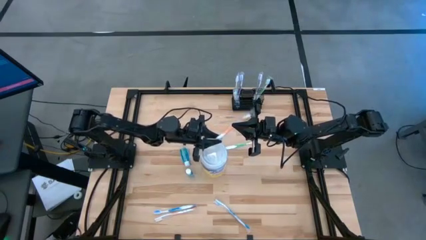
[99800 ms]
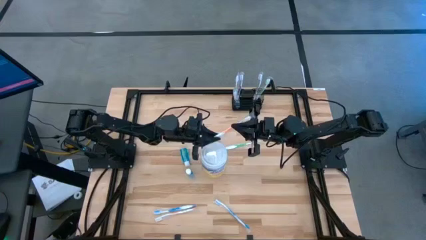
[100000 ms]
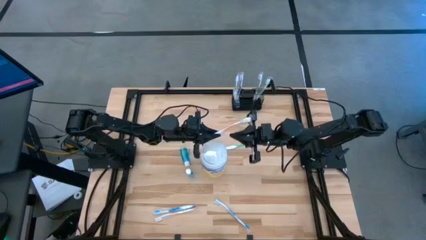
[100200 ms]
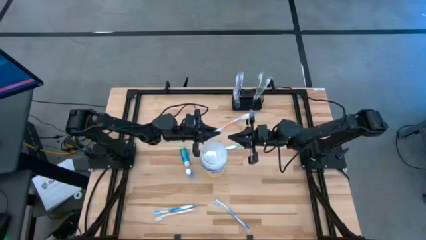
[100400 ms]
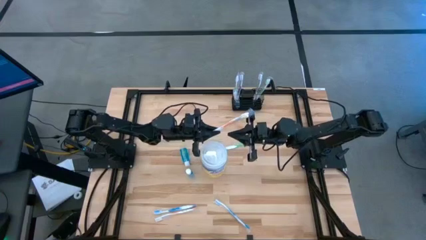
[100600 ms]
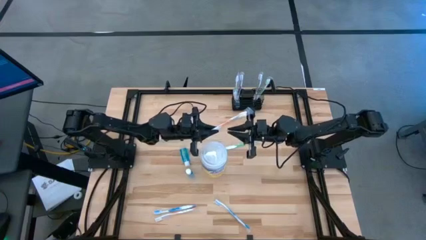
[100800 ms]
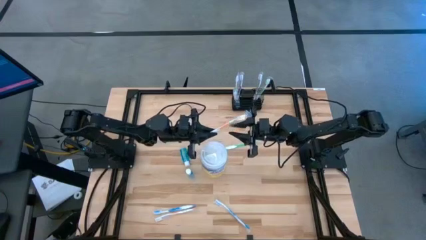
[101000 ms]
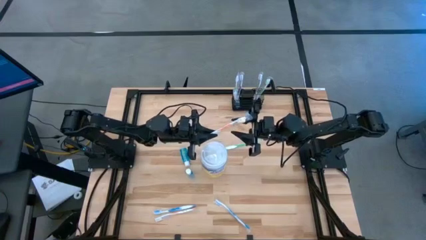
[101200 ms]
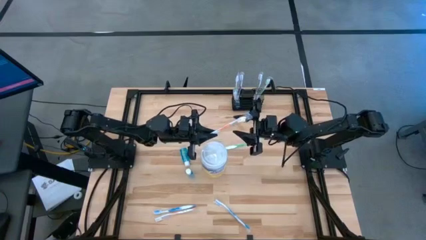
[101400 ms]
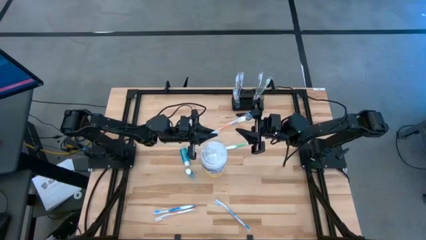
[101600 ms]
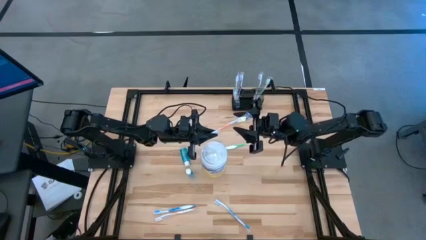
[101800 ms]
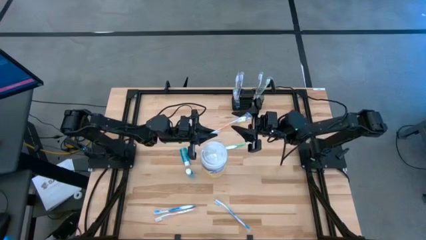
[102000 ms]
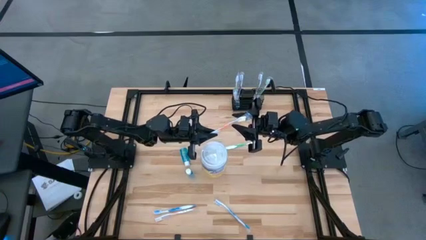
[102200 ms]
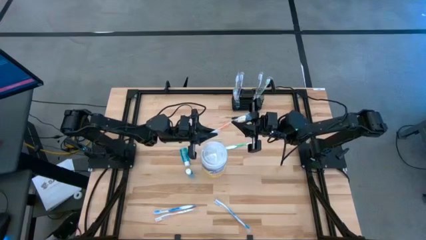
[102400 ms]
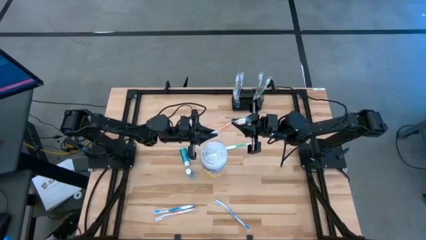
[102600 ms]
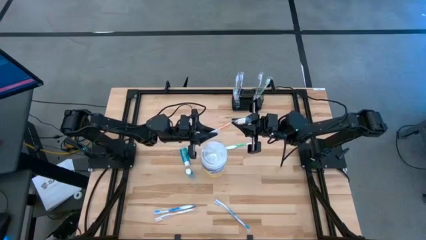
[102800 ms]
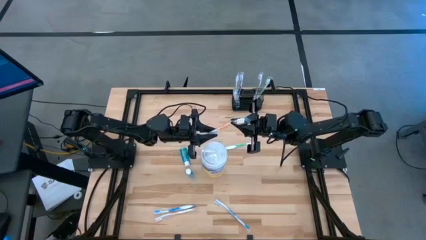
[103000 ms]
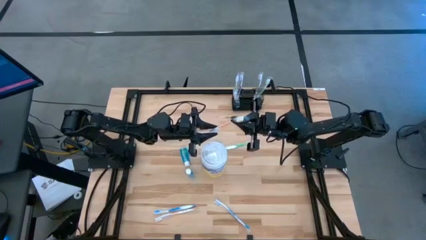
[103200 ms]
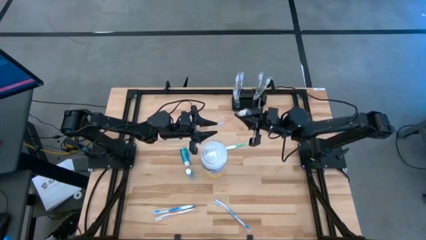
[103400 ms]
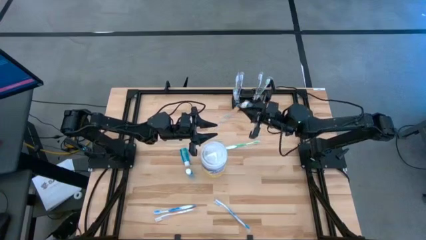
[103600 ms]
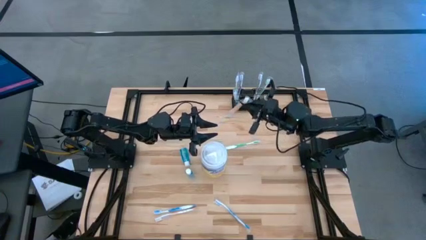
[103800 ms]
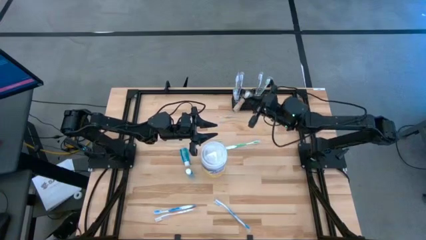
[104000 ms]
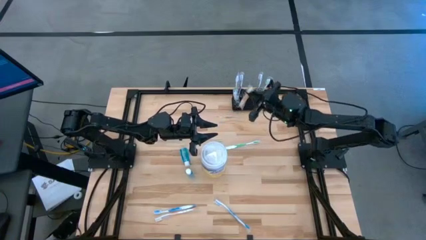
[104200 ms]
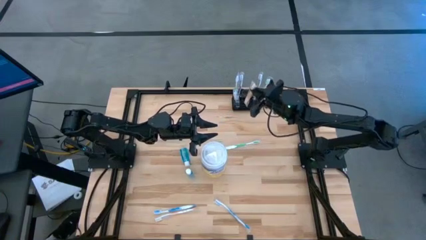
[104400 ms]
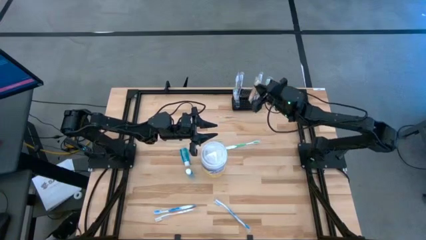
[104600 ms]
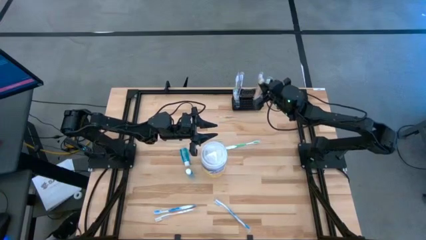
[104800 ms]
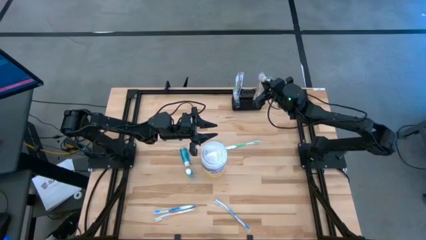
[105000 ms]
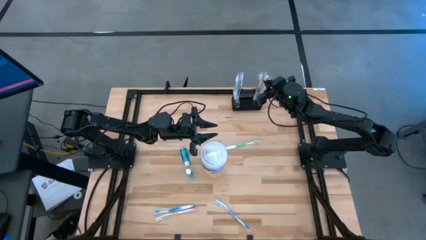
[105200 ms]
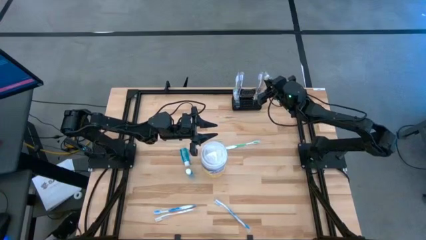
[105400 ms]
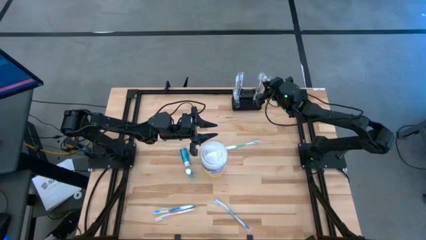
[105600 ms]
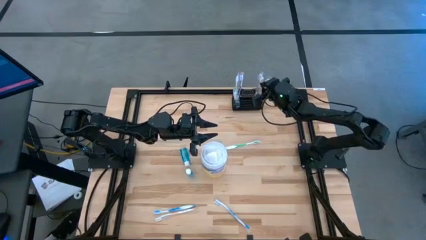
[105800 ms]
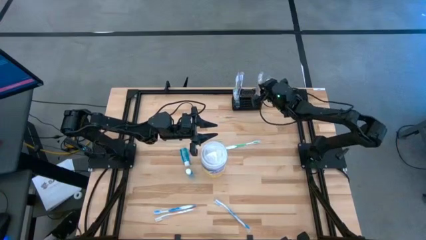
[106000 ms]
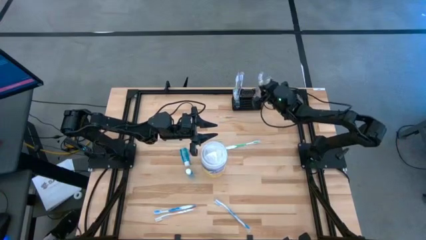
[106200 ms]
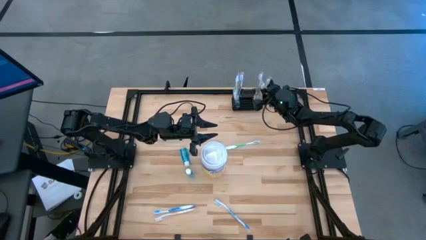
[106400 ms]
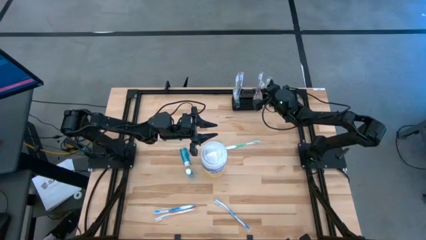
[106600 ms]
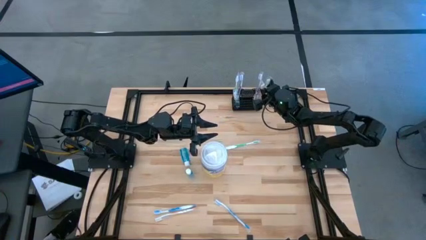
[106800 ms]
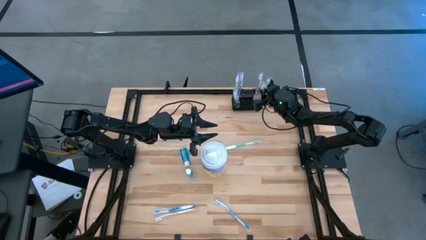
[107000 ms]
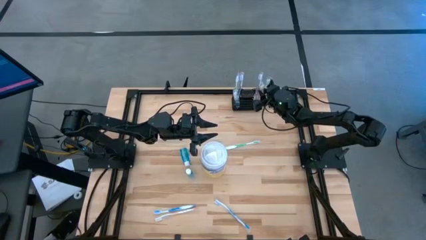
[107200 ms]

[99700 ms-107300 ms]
Task: Pick & Place toothbrushing station
Put the top orange toothbrush into the black mesh organizer

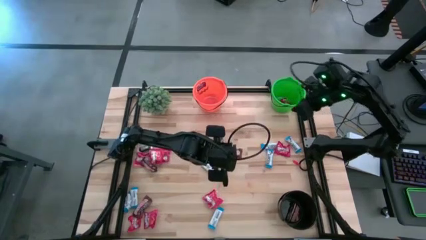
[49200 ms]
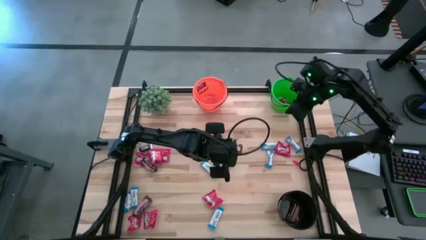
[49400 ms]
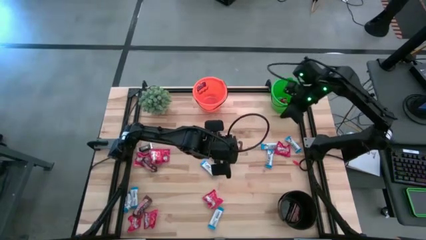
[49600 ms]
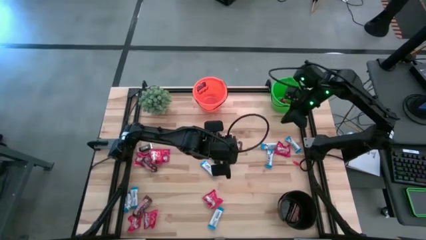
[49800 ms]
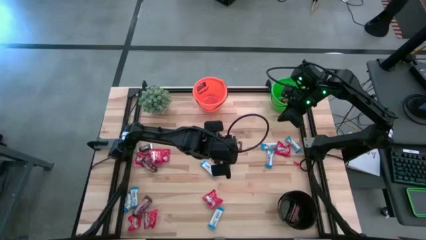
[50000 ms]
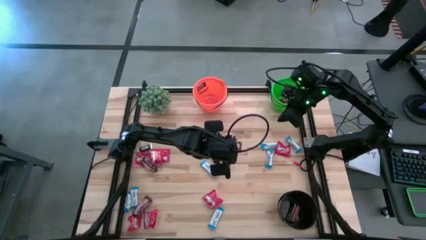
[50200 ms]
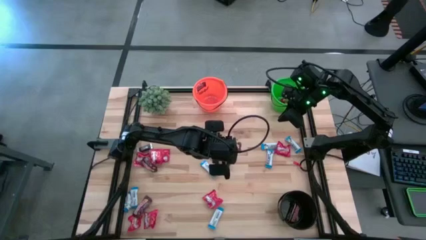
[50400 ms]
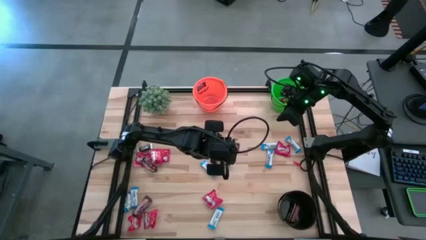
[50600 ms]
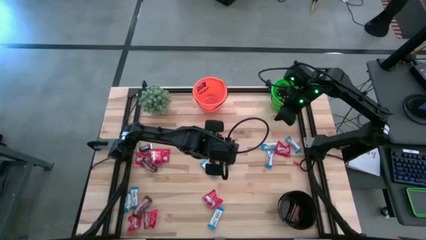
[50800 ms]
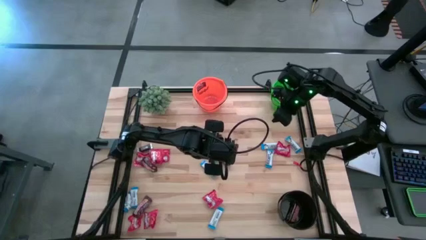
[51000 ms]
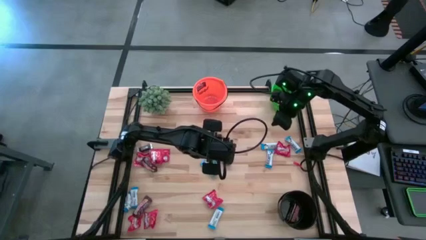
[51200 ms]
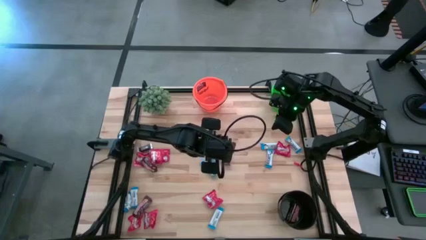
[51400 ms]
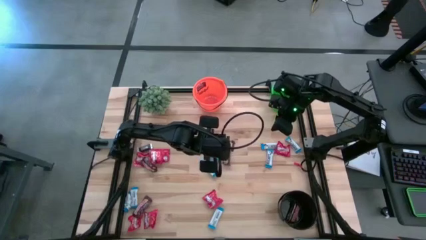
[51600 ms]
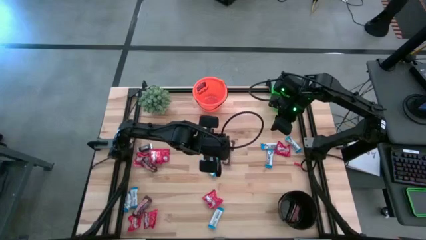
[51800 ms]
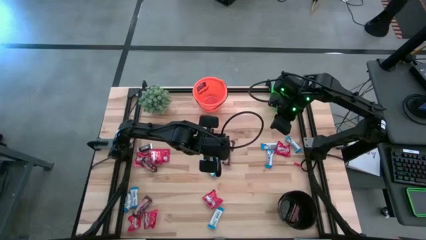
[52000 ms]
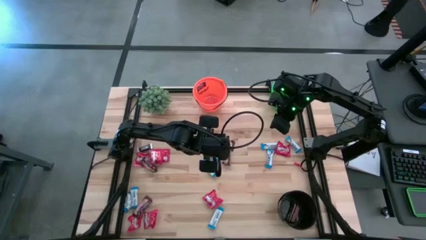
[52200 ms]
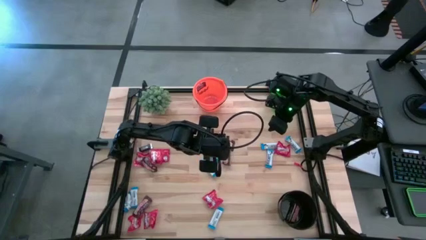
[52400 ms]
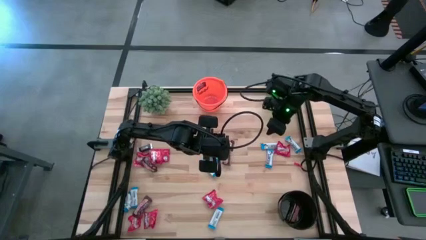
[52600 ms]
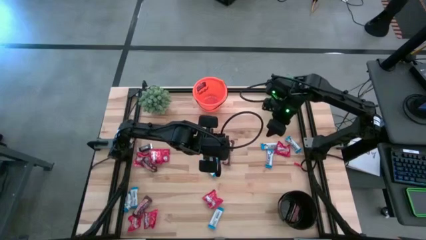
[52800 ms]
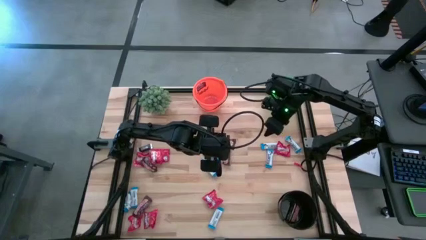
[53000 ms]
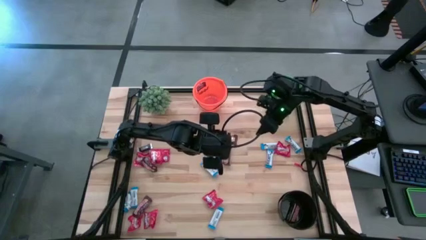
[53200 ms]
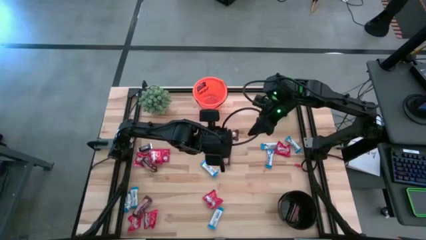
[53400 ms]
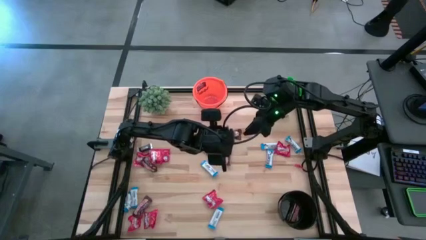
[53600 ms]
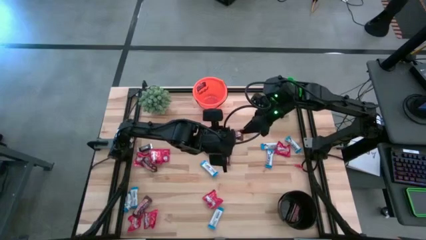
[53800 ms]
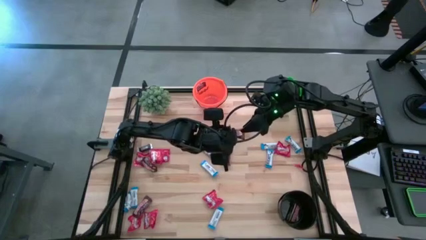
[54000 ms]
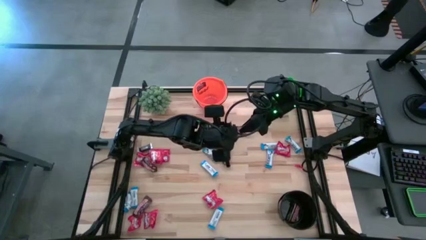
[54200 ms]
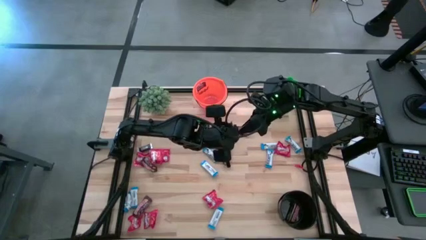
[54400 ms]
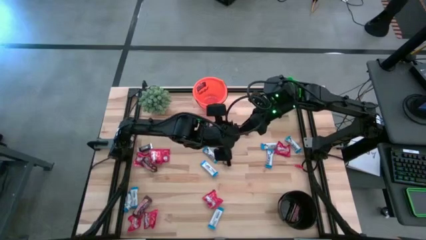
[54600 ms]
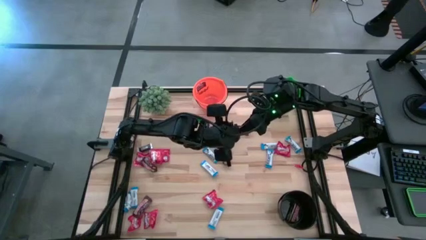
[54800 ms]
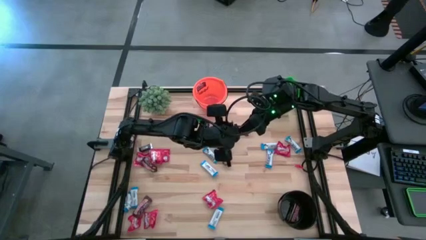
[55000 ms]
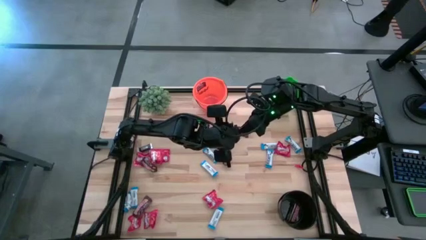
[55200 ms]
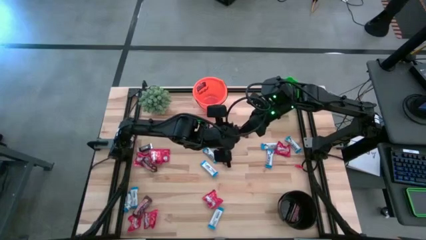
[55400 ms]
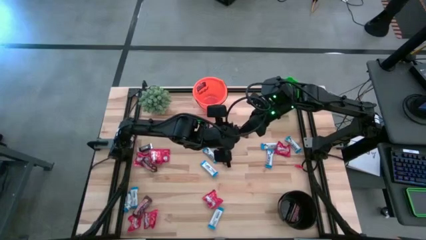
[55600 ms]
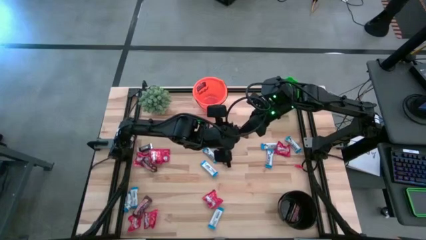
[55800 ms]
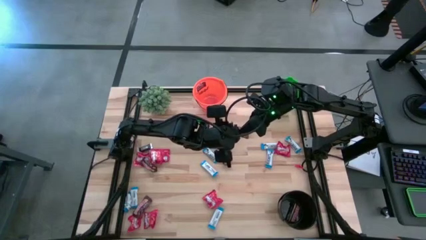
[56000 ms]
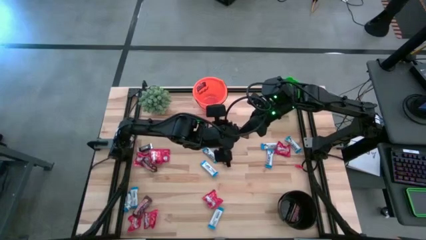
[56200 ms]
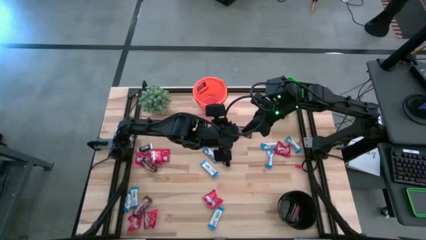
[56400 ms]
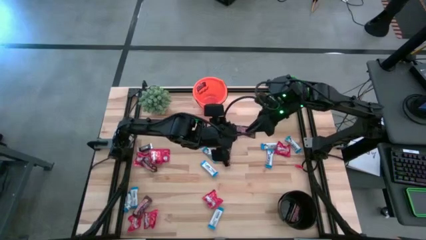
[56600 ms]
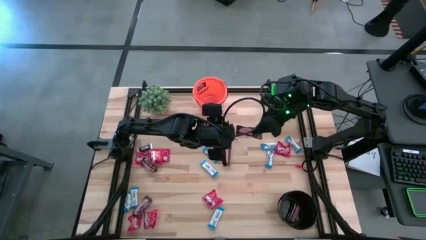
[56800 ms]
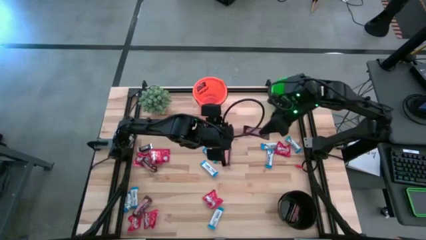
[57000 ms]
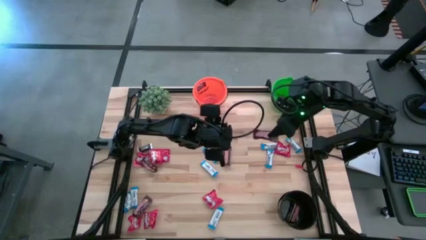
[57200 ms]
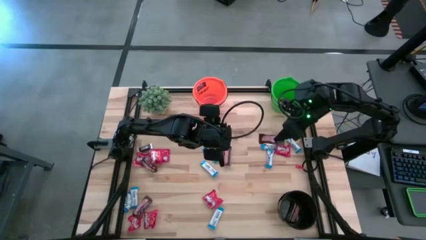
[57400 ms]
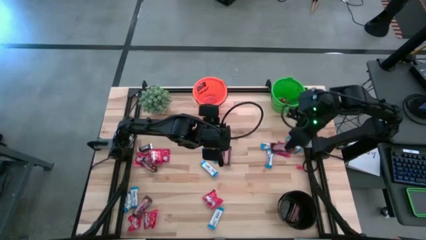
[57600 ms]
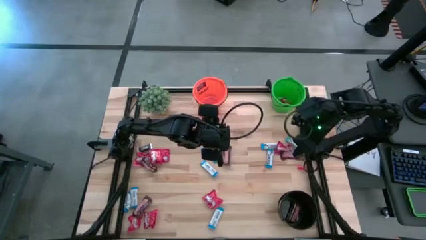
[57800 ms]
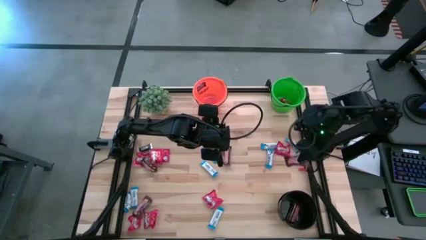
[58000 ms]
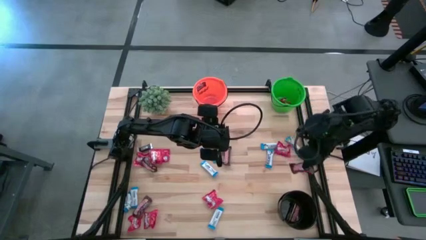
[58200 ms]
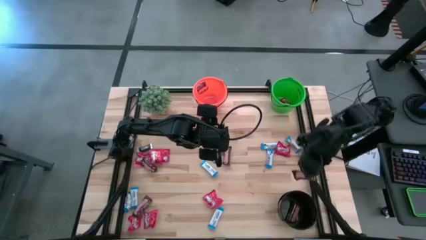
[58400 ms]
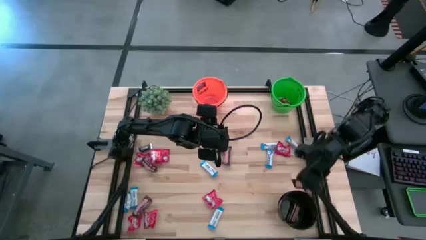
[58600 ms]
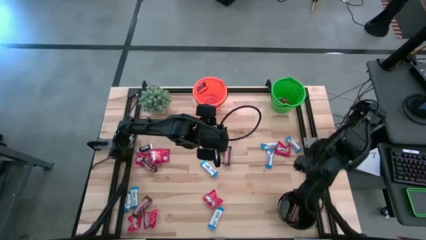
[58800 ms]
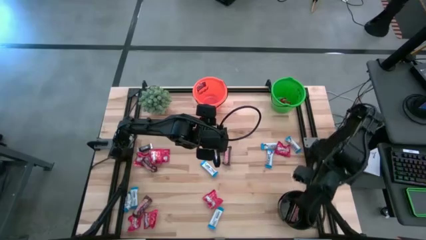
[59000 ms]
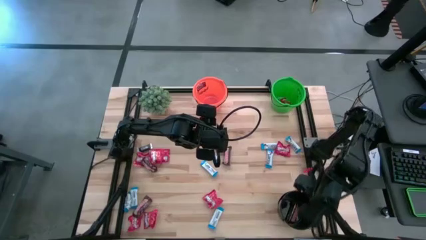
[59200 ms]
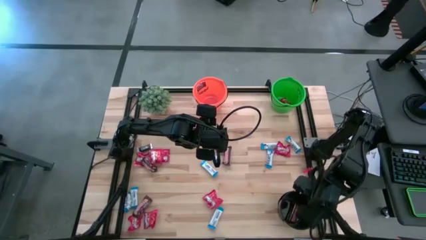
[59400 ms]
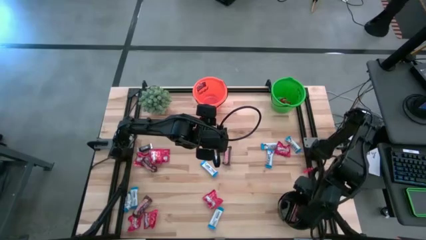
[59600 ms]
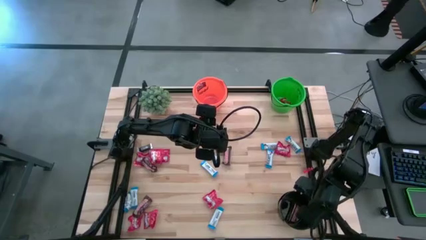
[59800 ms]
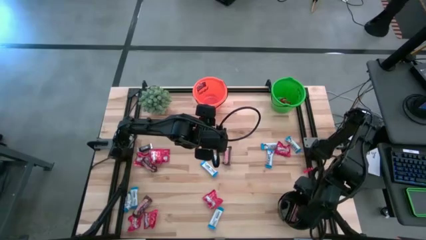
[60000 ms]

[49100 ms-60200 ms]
Task: Organize candy in baskets
Put the brown chocolate bar into the black bucket
